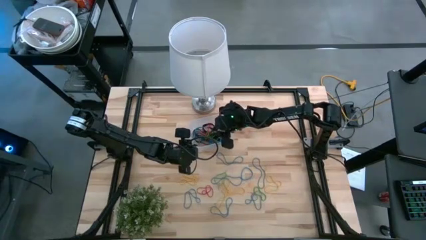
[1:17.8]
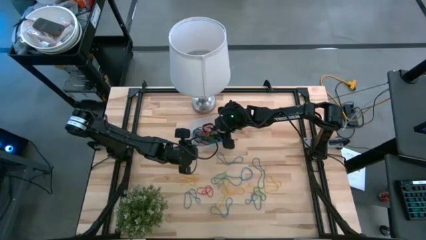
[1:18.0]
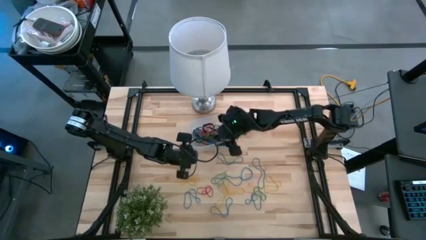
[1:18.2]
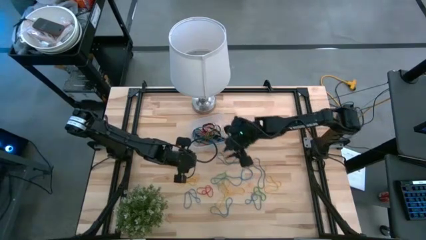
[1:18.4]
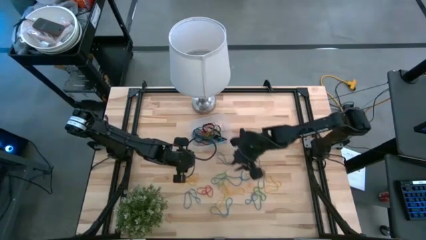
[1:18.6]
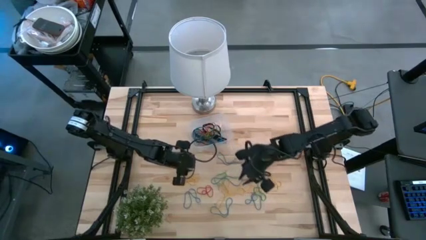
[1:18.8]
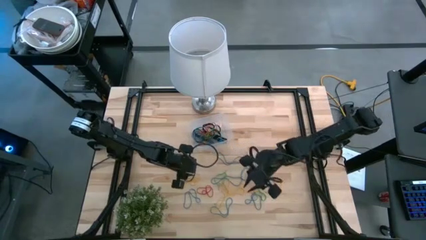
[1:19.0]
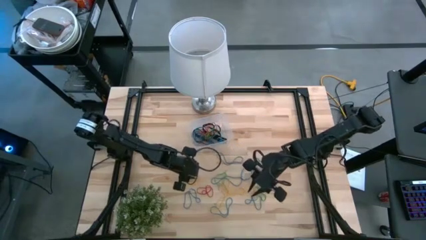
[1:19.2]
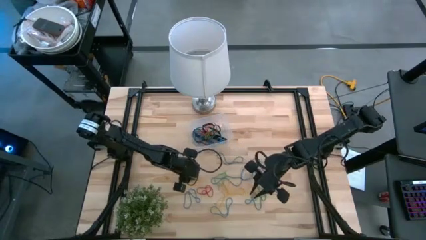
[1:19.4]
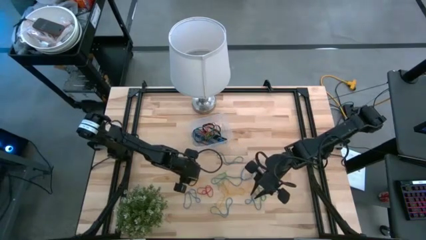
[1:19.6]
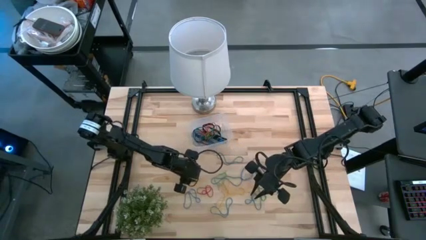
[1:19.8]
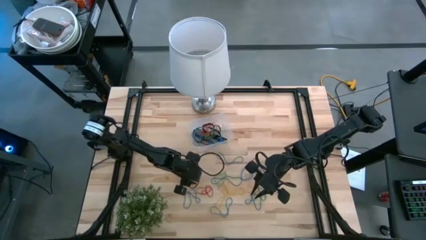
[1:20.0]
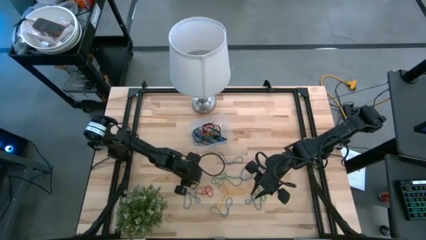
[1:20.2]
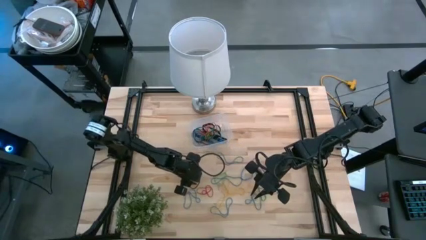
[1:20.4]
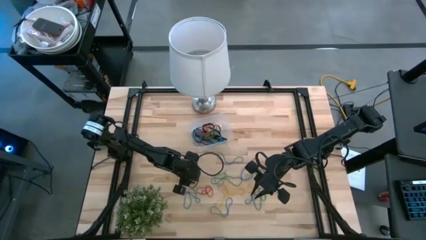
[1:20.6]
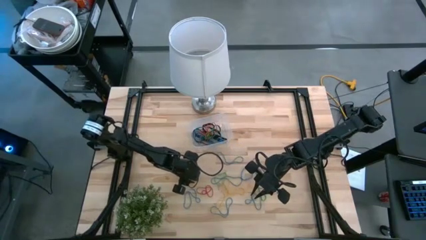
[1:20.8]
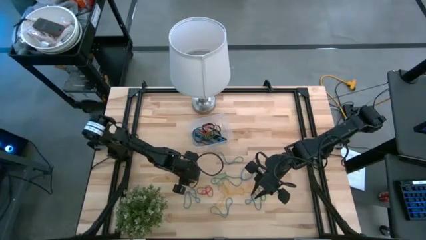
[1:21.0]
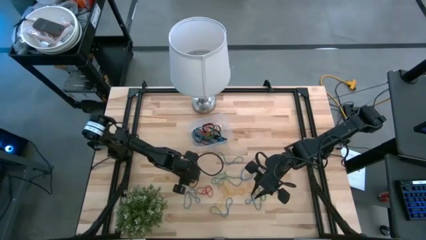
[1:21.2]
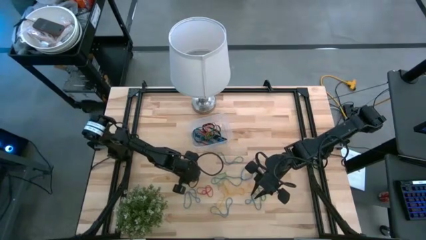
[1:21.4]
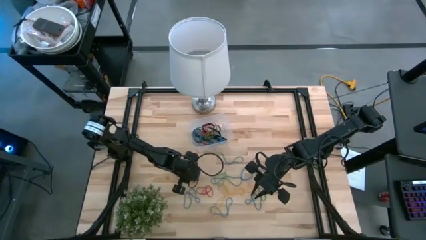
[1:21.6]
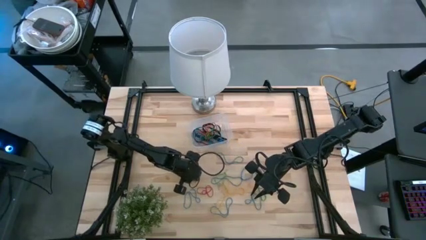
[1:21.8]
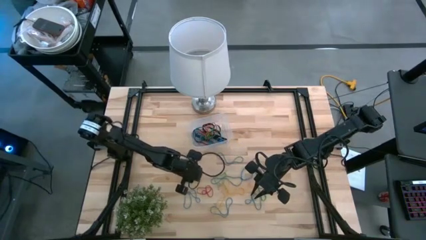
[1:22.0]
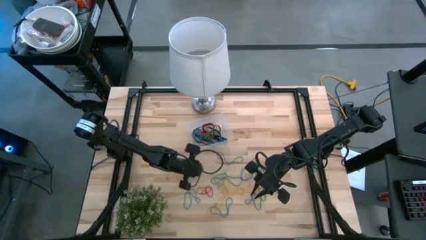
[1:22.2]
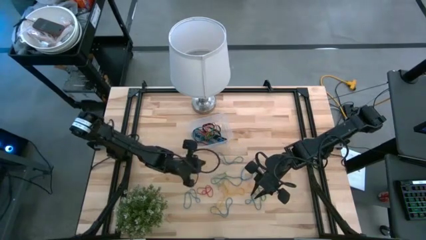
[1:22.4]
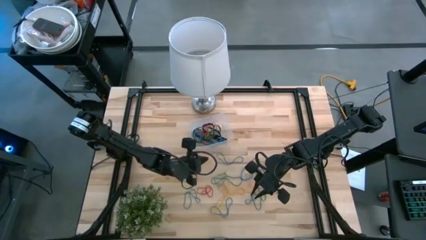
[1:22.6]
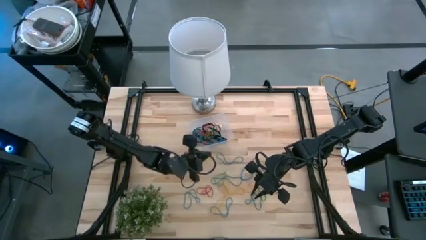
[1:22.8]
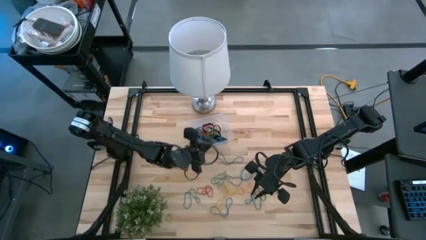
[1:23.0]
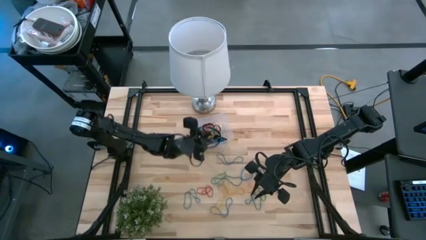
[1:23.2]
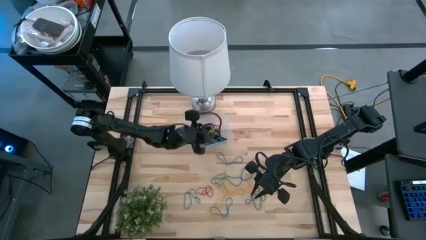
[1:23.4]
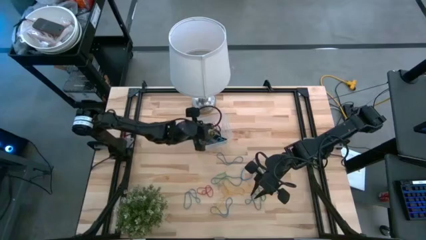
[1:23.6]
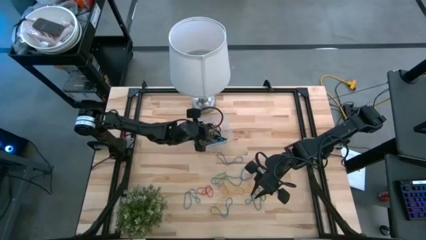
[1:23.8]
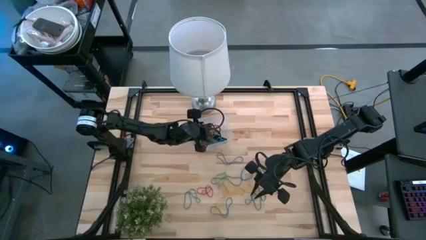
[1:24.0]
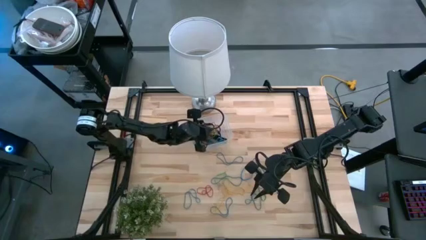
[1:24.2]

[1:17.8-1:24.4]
Task: Pick and place rubber bands into bin
Put the yellow rubber band into the transparent container

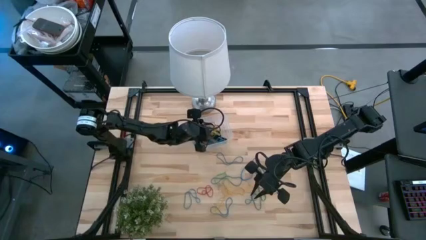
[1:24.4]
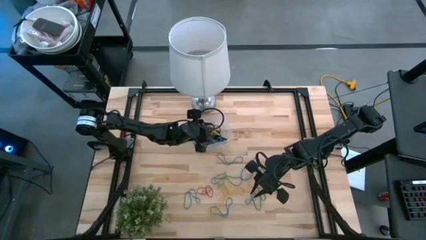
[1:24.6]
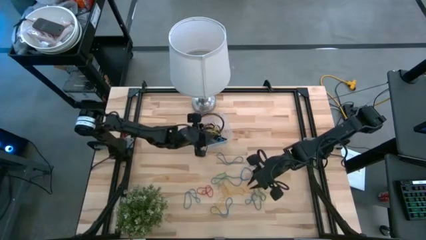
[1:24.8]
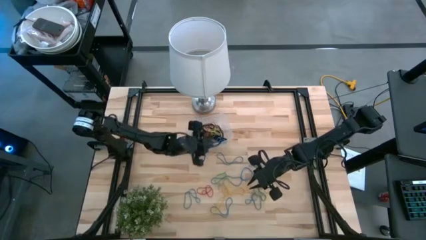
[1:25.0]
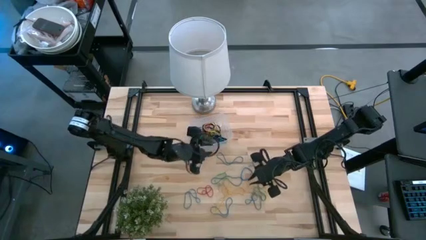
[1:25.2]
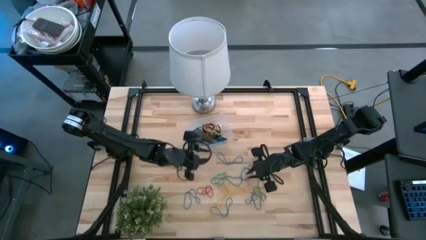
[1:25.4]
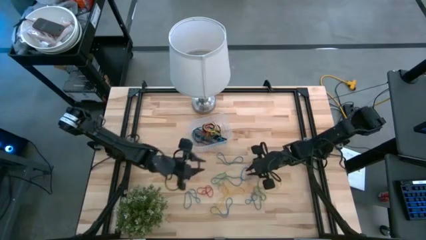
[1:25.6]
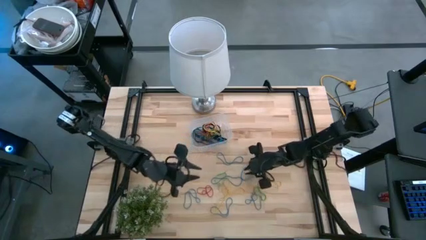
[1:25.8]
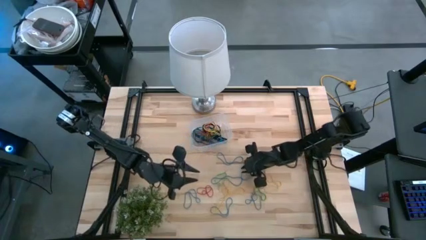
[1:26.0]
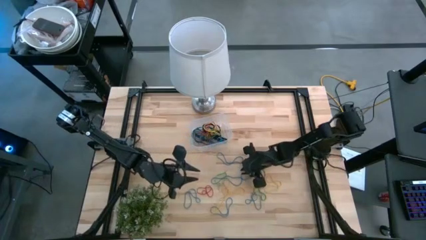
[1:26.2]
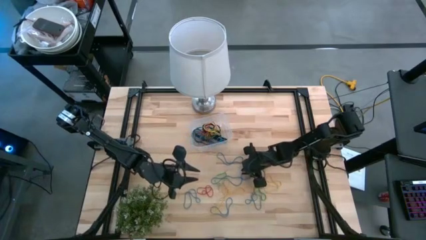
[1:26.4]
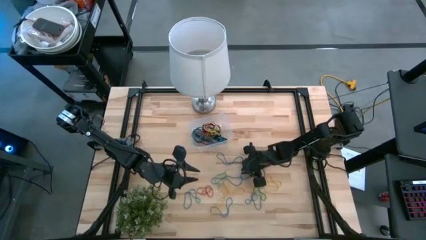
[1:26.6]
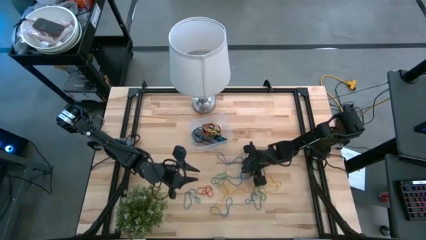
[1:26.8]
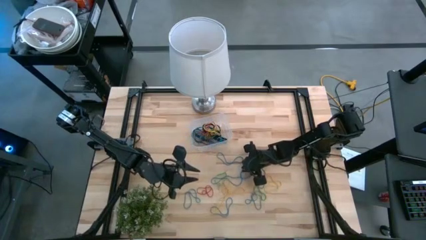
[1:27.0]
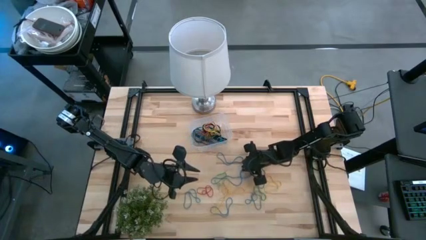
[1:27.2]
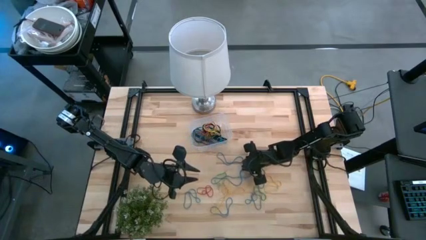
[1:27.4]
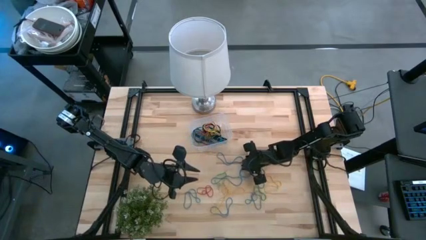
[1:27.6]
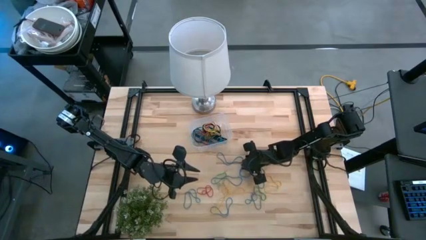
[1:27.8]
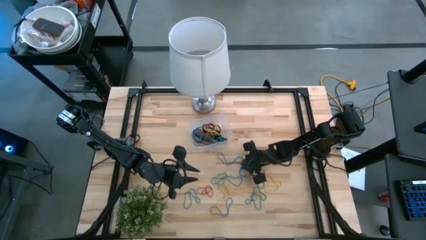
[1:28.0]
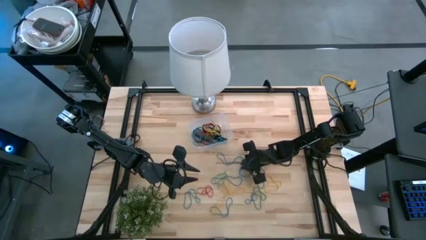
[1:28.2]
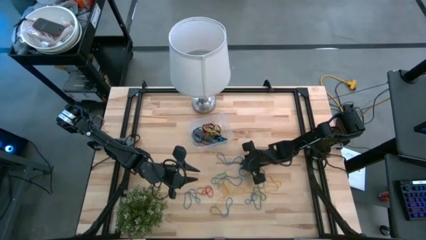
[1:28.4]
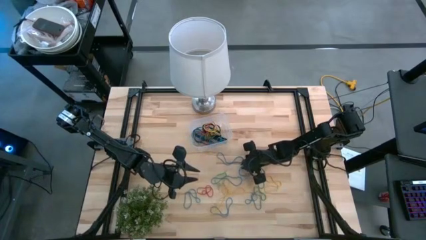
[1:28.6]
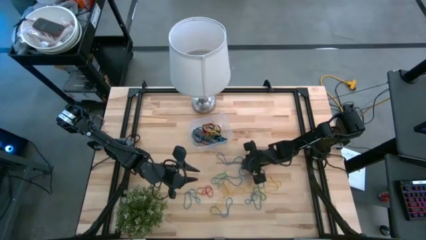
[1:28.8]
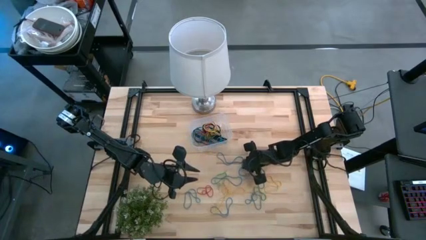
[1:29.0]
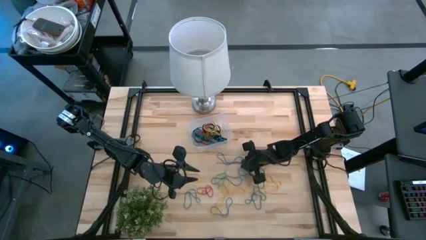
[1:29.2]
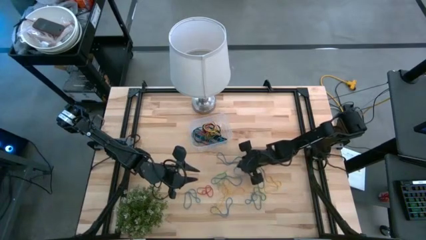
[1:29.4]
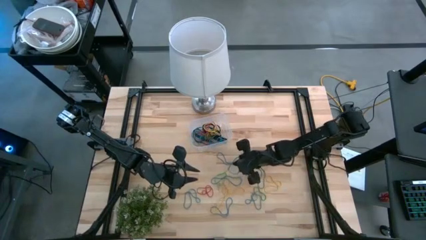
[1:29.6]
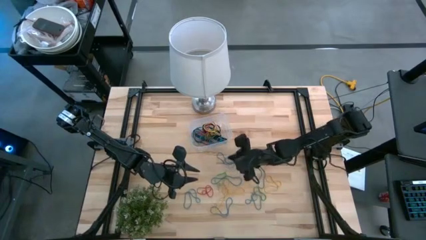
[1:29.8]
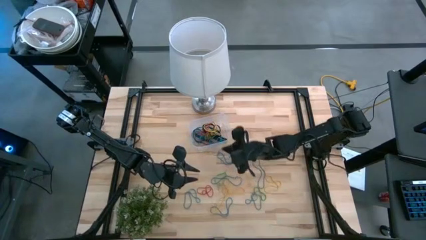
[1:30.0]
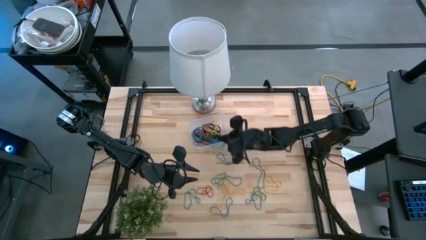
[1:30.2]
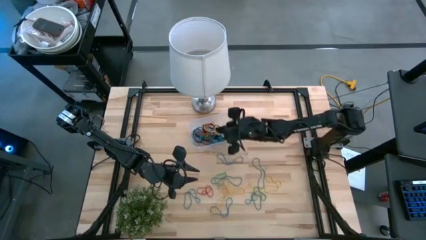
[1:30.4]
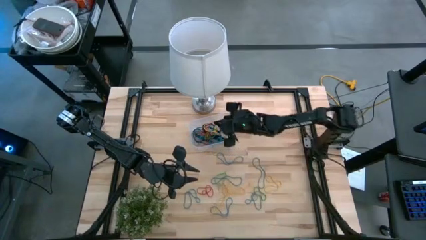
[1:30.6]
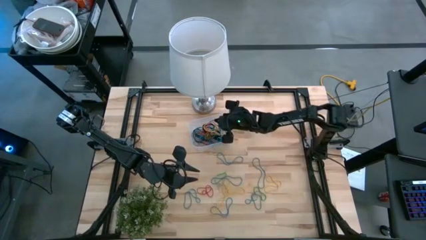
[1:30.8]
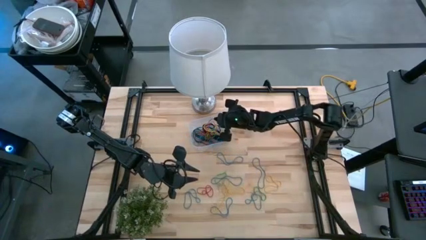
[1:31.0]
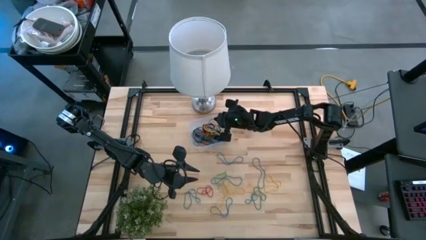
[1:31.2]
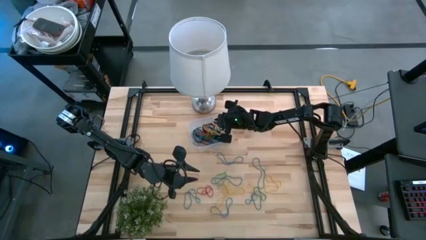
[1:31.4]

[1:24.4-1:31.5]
Put the blue rubber band into the transparent container

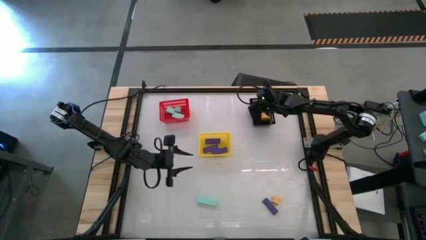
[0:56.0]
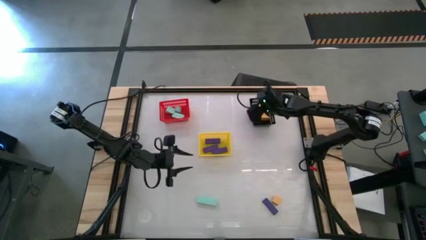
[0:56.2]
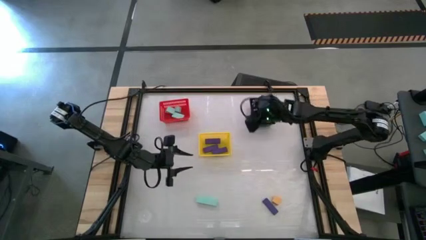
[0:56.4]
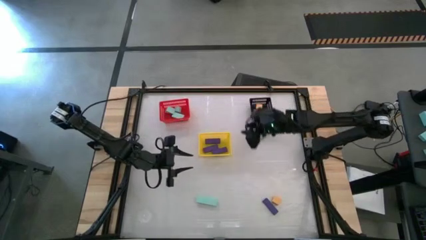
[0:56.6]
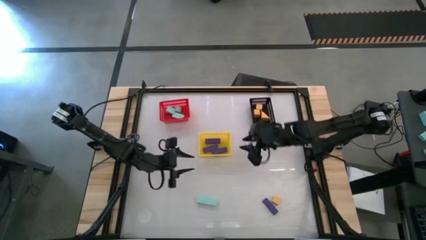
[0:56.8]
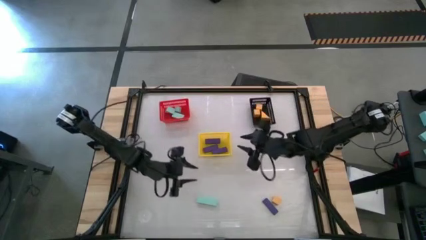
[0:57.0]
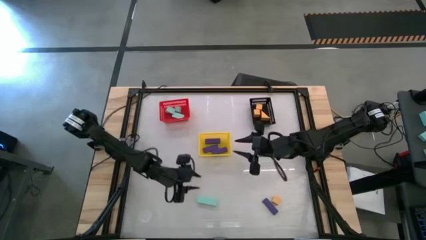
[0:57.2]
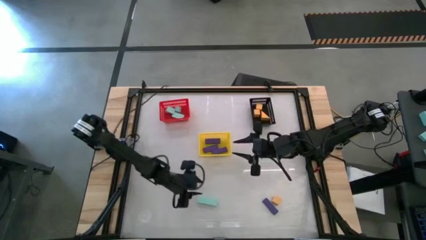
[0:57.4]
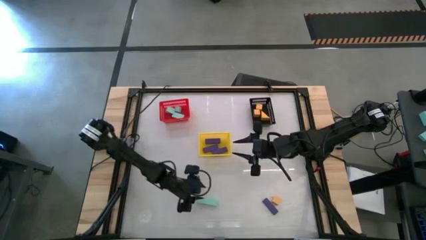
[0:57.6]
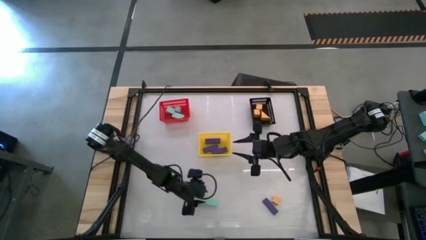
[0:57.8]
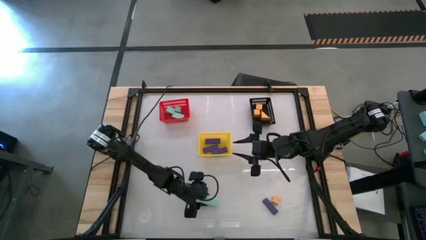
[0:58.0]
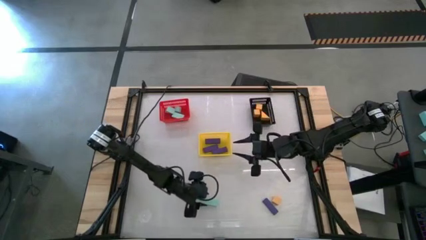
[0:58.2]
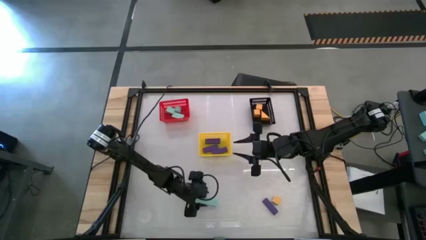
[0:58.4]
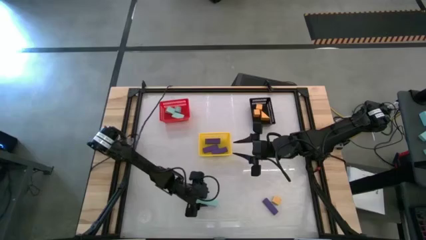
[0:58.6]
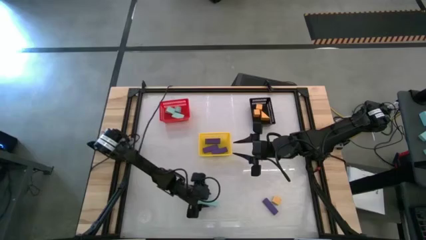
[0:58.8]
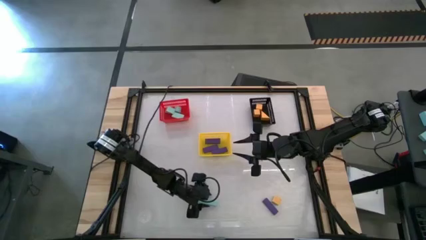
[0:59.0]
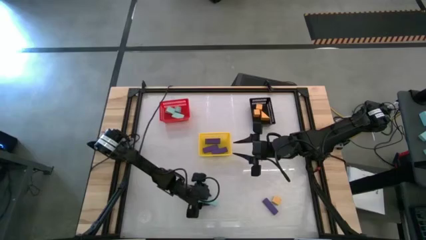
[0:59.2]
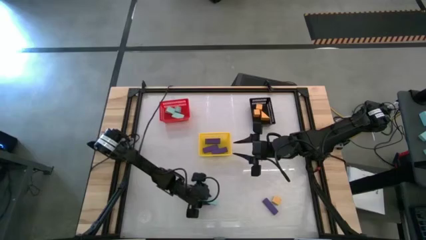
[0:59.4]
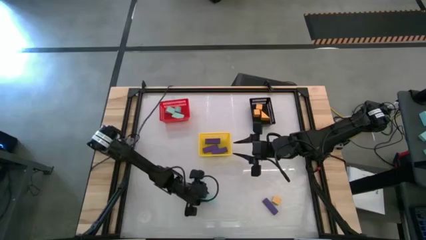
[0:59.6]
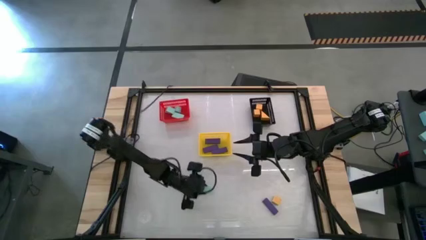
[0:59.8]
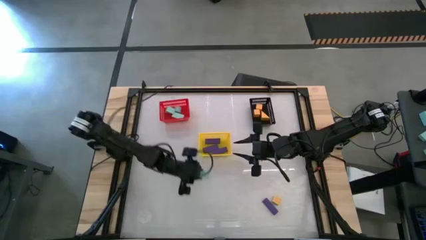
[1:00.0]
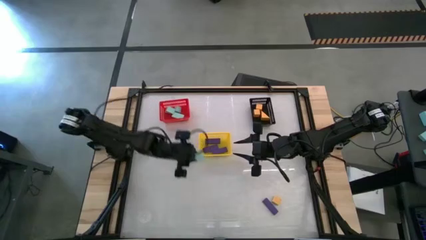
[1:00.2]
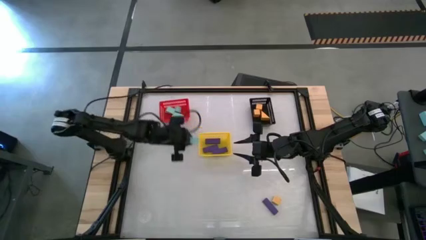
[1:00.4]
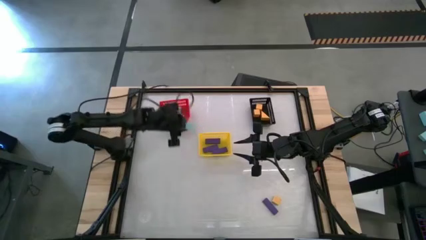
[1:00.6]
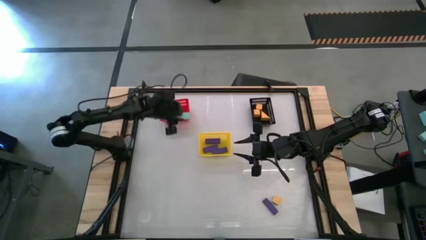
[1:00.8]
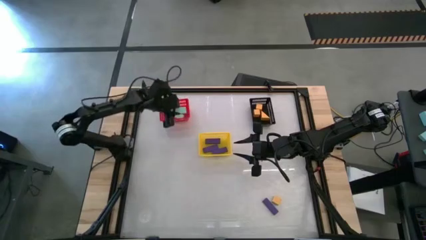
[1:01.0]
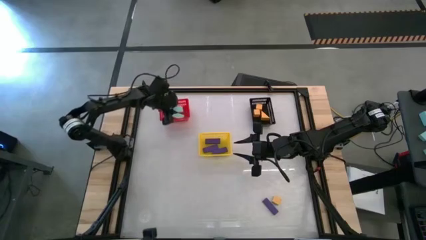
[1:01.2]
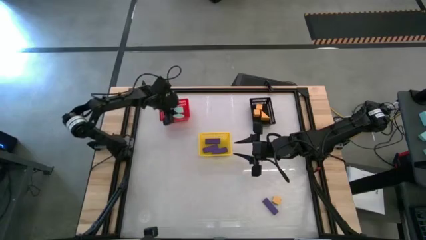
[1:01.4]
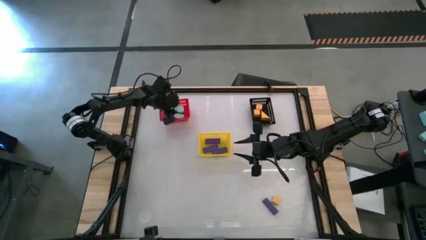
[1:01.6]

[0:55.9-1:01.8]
Task: Sort & place blocks by color
Put the light blue block into the red bin
